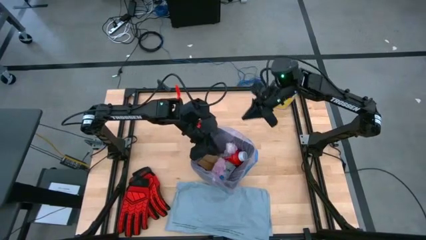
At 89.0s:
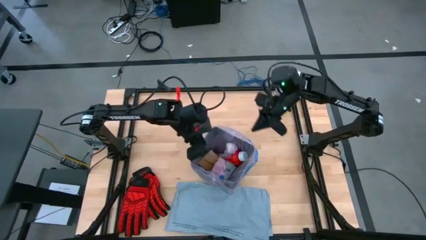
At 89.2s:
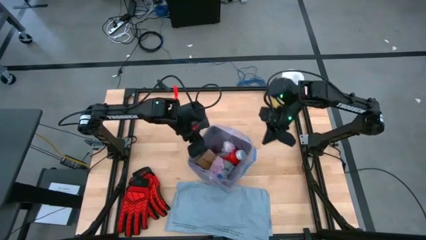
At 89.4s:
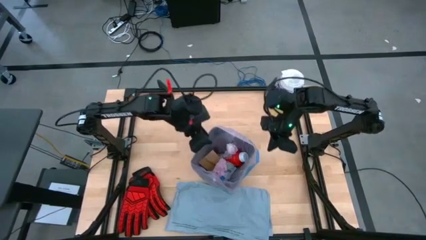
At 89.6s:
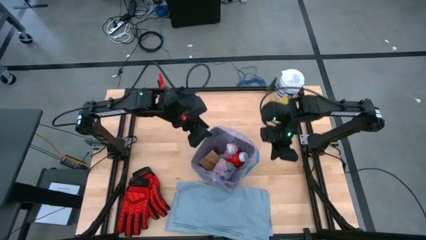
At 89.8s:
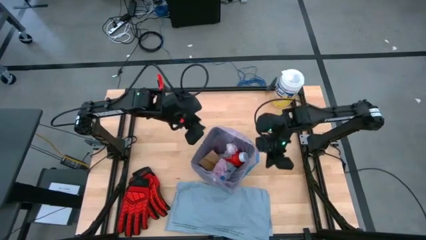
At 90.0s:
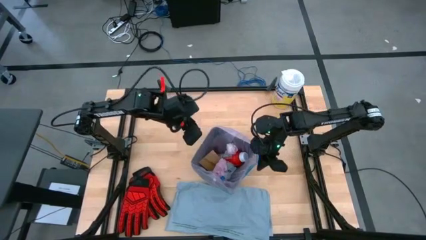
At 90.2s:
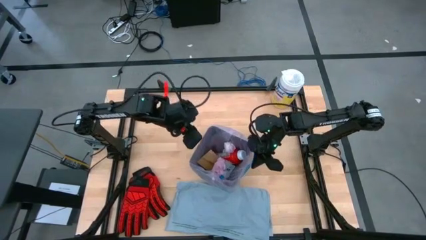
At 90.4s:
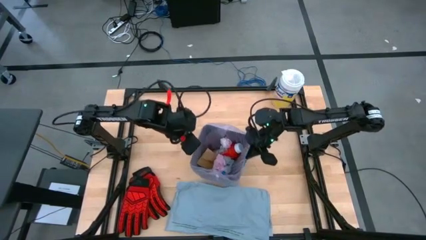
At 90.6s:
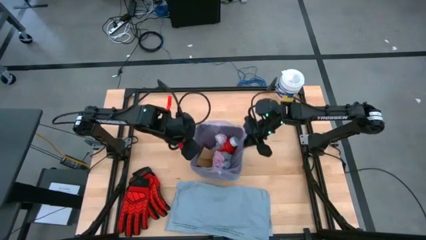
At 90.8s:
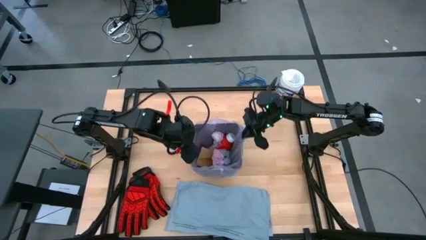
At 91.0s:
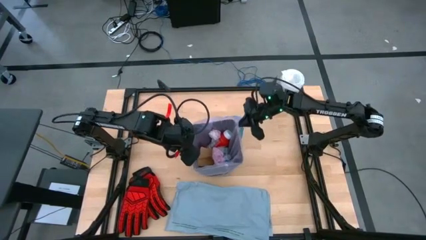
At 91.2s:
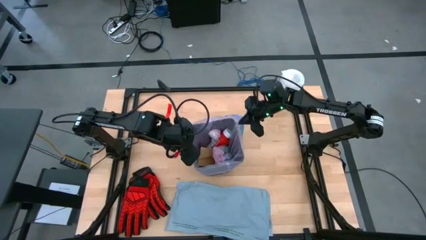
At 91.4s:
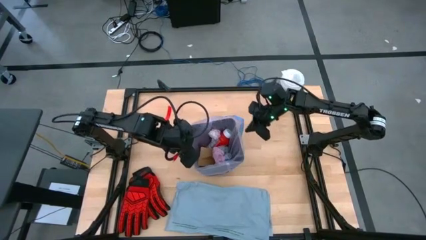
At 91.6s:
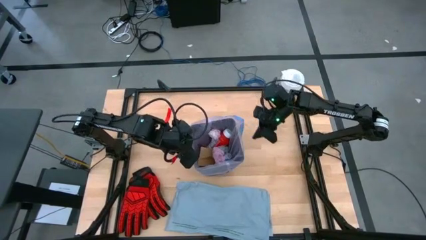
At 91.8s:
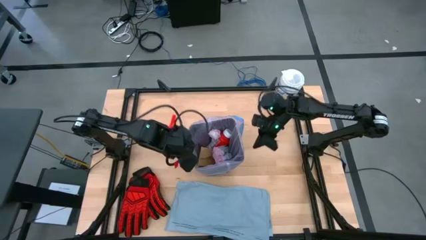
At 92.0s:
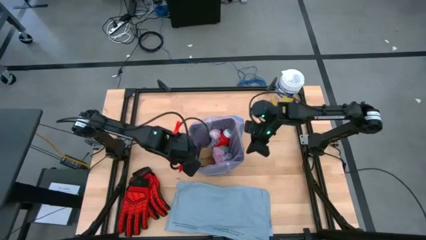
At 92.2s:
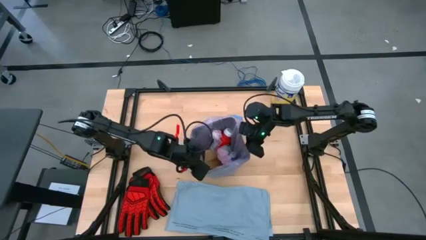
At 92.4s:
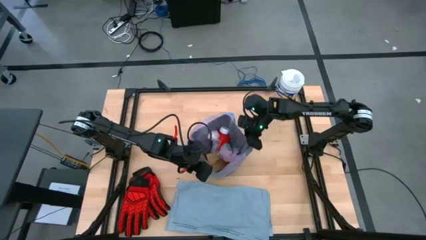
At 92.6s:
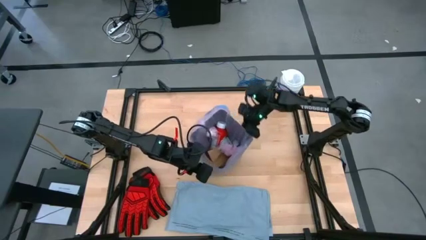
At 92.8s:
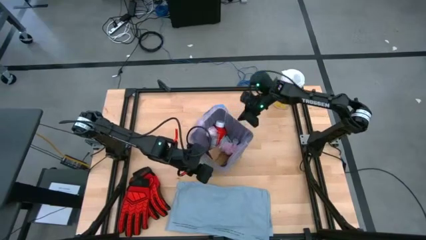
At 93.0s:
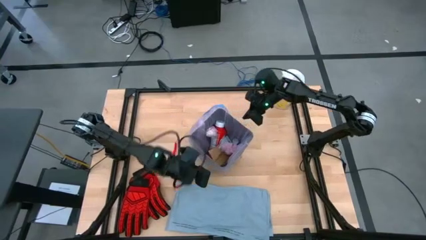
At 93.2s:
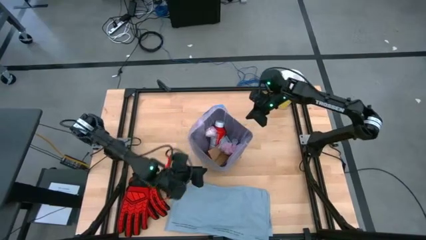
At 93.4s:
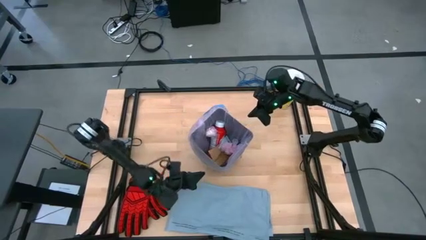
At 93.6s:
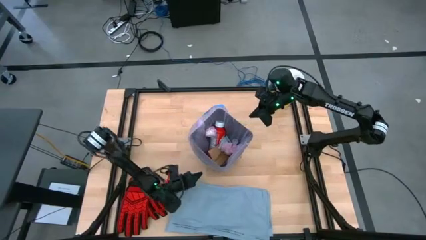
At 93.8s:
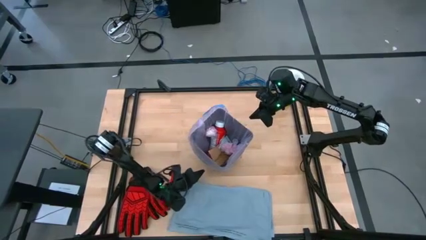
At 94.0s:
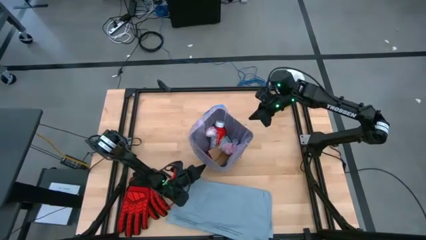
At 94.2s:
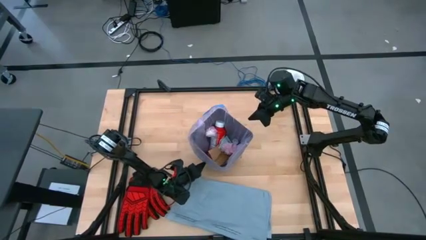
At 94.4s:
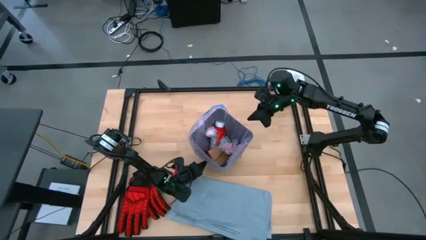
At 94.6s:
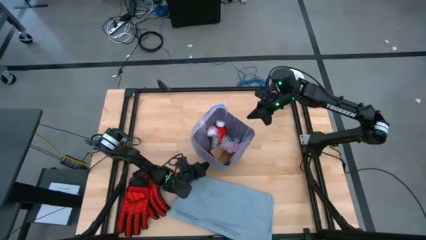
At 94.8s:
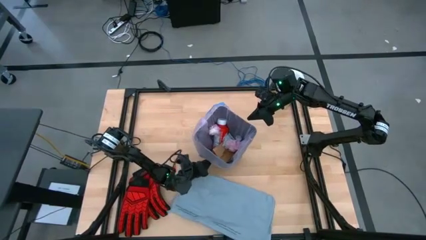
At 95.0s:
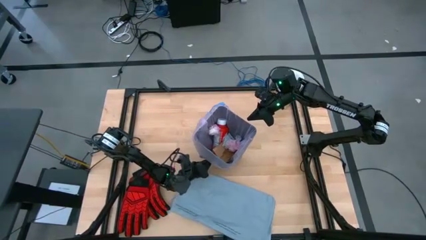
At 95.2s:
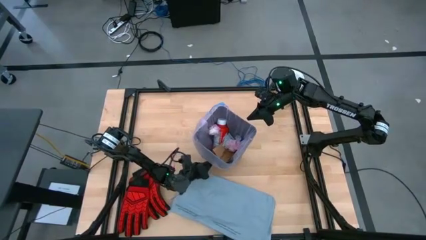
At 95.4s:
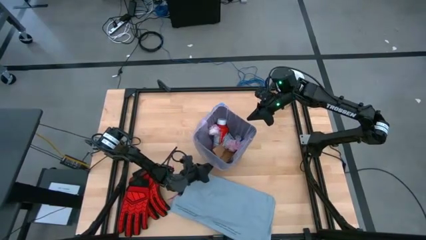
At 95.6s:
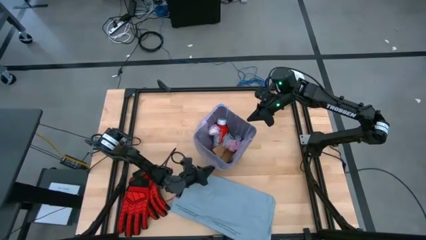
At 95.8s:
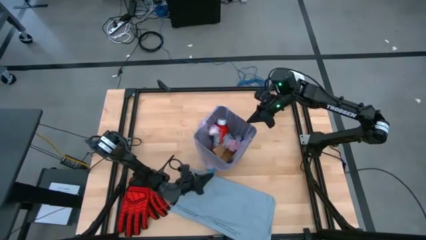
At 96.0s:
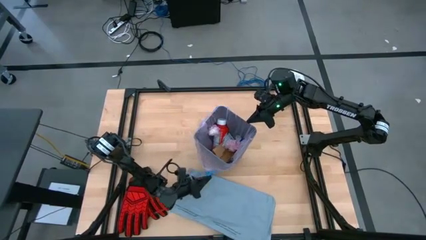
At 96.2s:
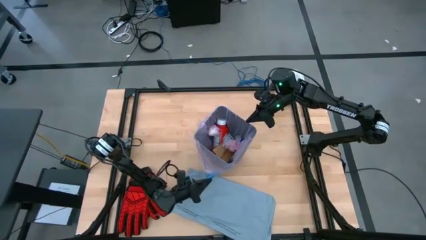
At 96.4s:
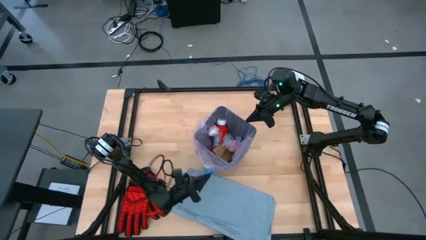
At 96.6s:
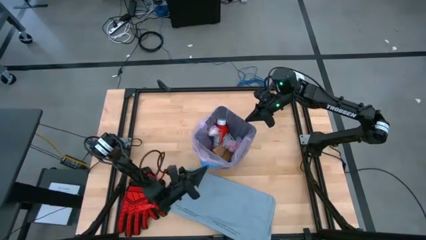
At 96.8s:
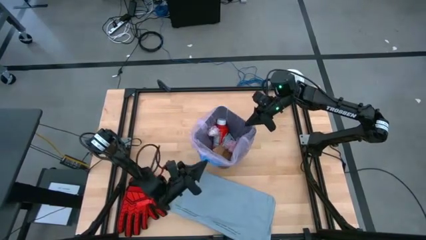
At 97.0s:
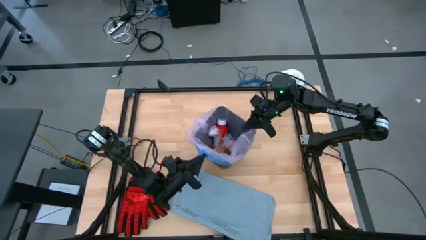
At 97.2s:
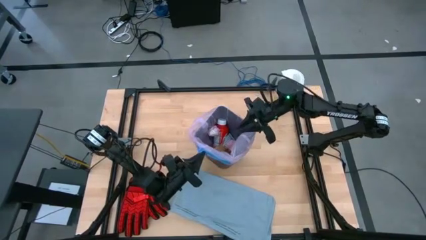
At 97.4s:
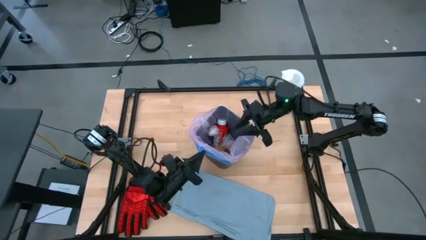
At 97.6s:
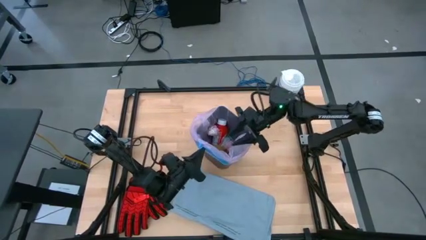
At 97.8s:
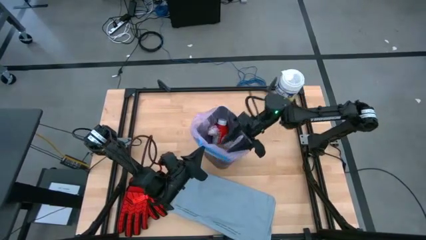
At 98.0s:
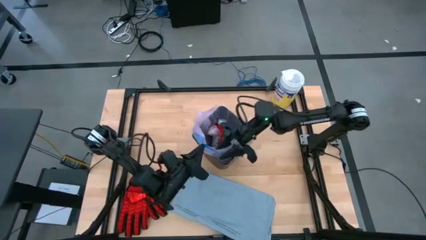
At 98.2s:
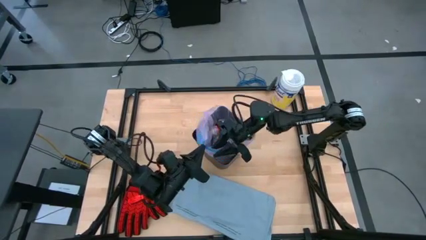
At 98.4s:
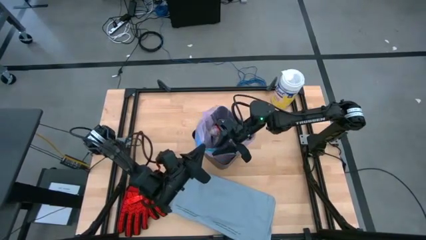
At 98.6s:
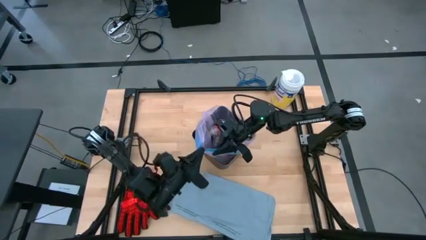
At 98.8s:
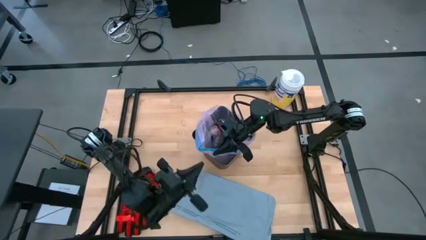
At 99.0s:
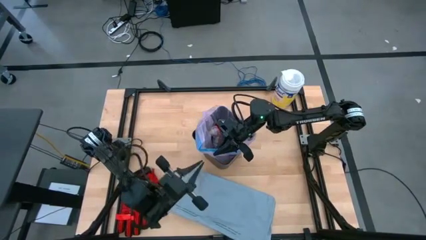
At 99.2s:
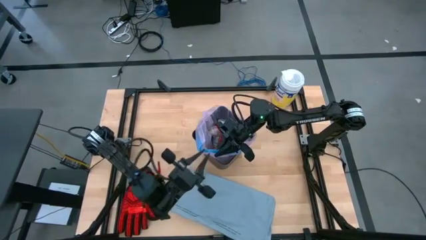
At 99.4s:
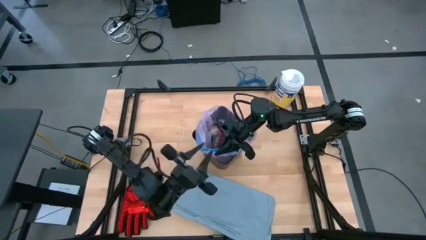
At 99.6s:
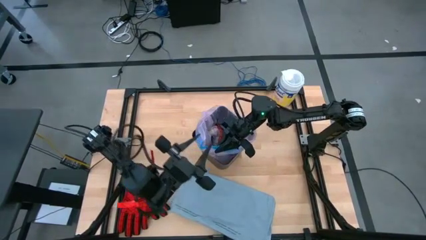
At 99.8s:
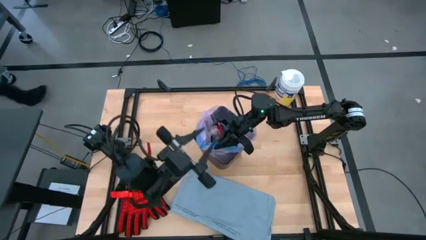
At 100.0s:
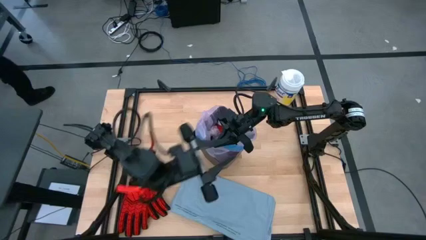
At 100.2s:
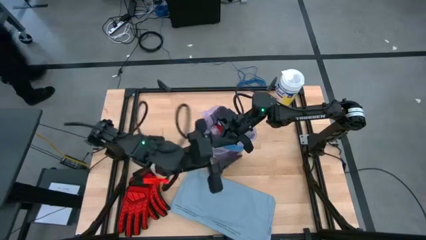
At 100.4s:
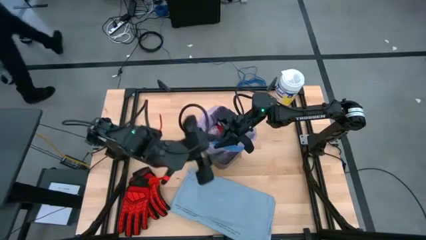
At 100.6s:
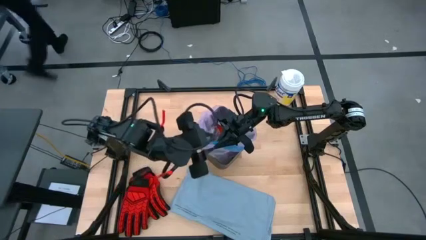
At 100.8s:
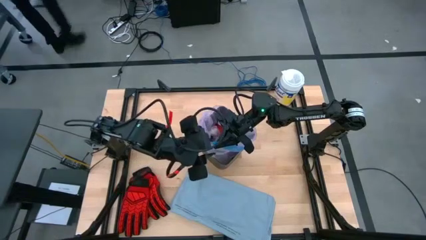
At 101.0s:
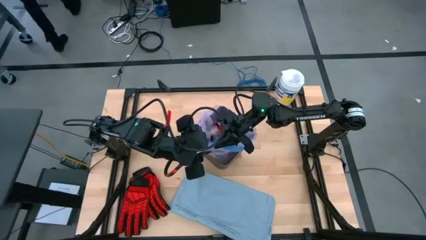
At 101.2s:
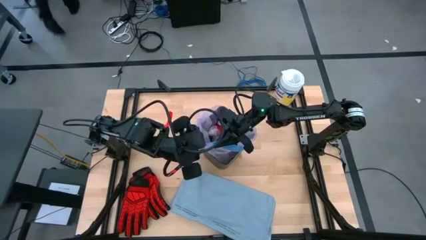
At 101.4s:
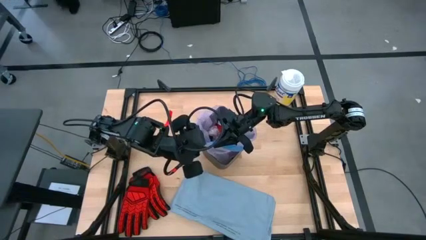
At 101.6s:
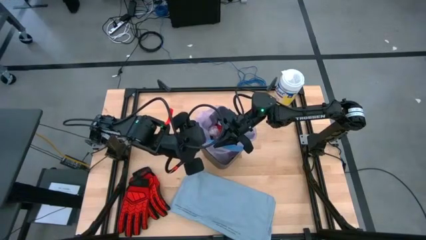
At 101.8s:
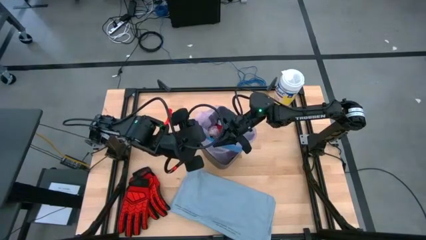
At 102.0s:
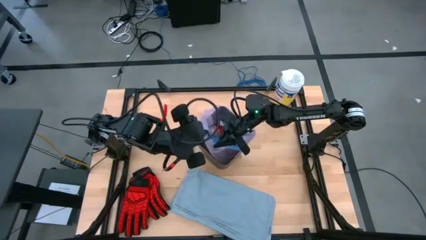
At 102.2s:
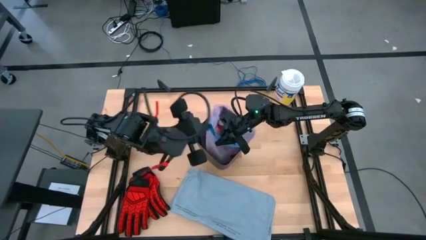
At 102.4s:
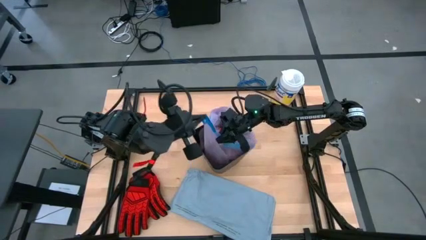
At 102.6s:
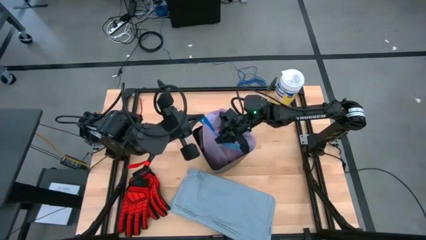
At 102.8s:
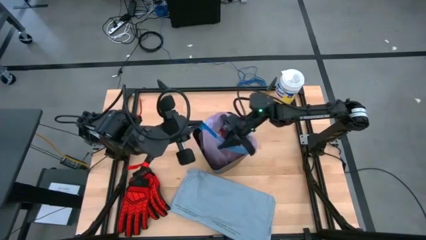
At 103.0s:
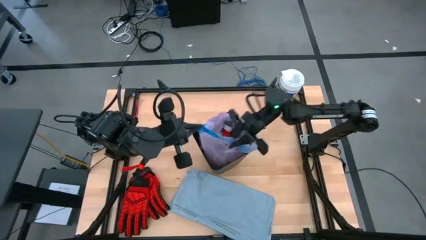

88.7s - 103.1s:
Task: place trash/remove bag and relplace
Remove the pink trash bag from the trash bin

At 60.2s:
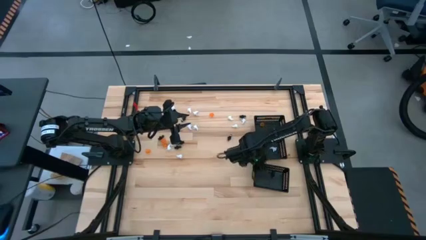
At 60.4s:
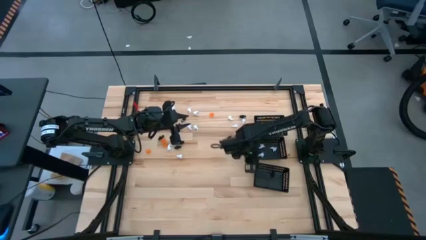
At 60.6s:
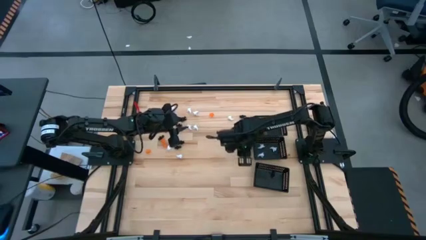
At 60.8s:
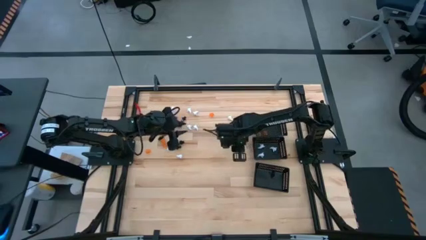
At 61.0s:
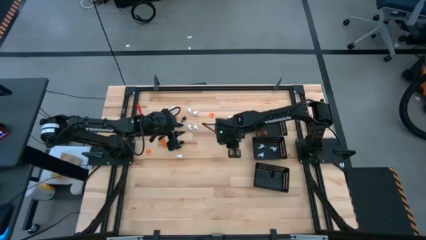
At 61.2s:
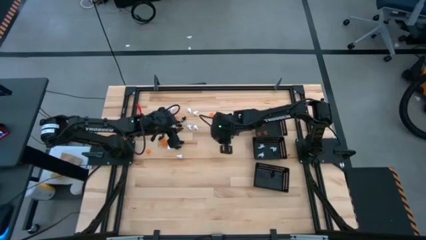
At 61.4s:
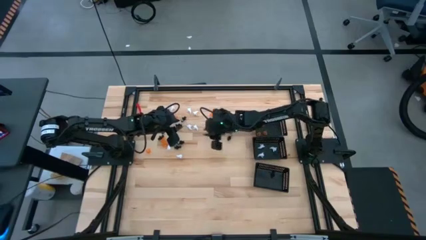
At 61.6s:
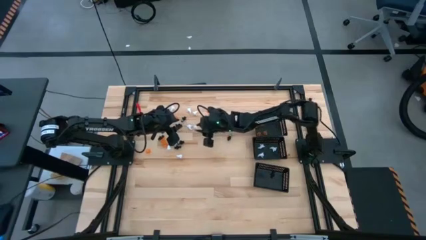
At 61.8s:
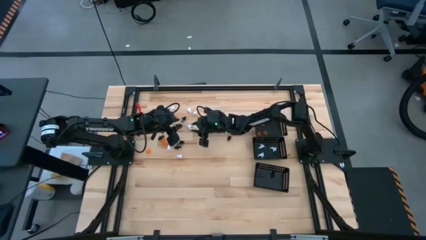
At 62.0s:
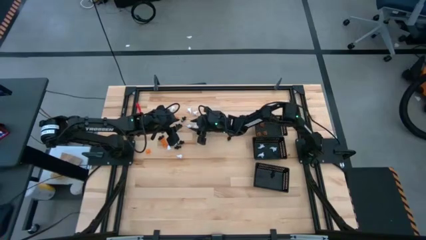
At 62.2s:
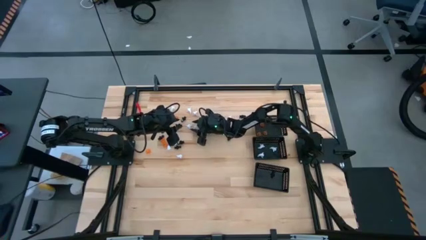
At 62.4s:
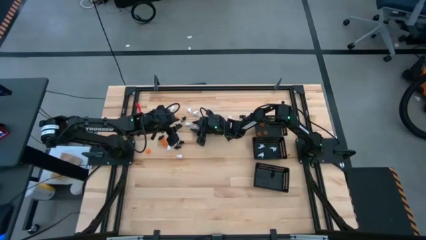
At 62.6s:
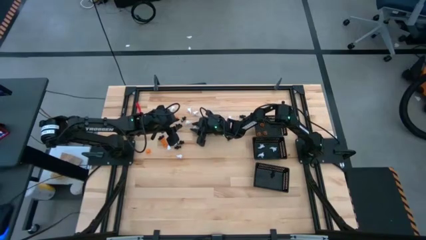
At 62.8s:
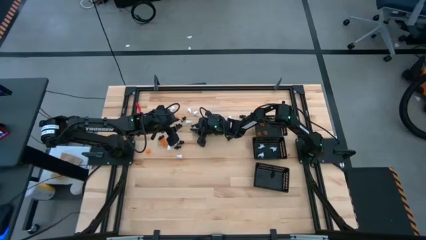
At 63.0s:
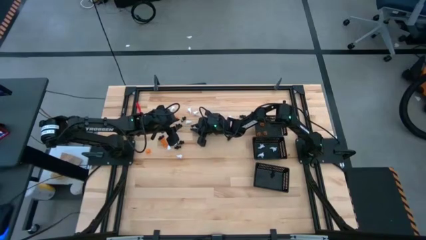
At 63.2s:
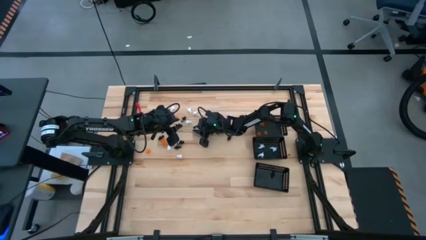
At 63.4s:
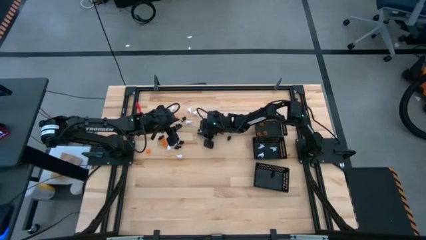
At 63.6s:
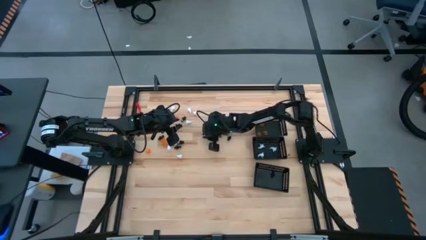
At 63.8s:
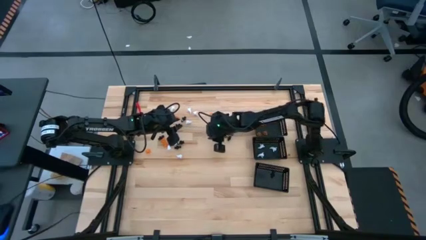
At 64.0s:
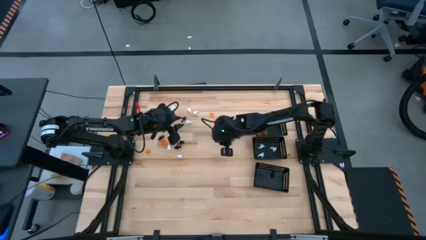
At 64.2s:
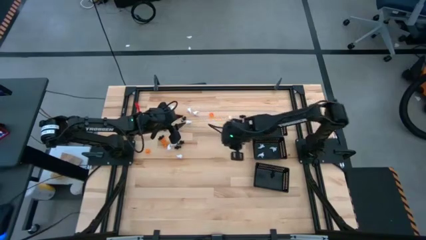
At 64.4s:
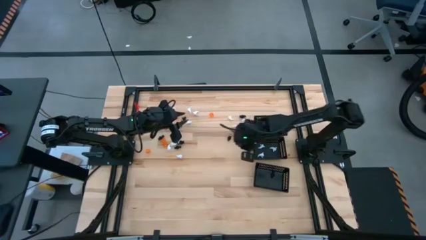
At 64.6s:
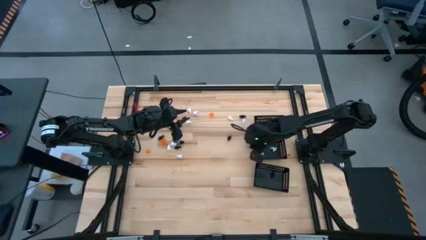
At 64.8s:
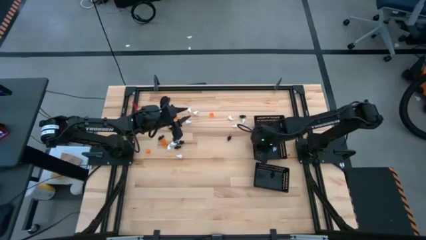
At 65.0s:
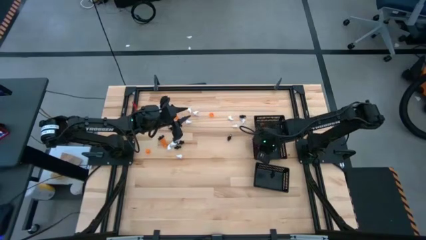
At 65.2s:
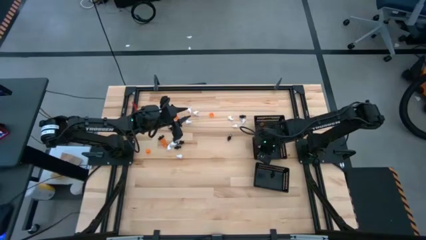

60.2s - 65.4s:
Task: Sort Halloween decoration
Put the white ghost toy into the center black bin
